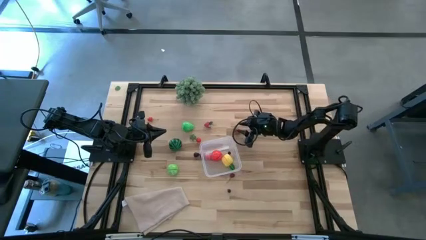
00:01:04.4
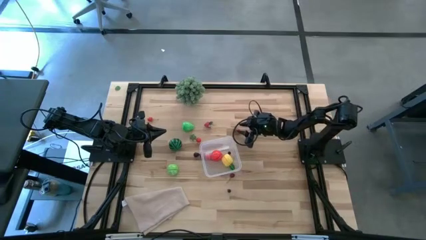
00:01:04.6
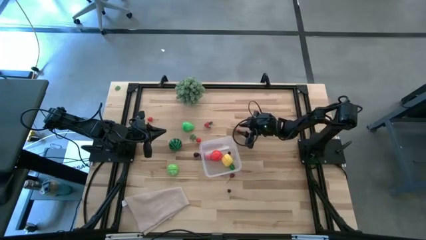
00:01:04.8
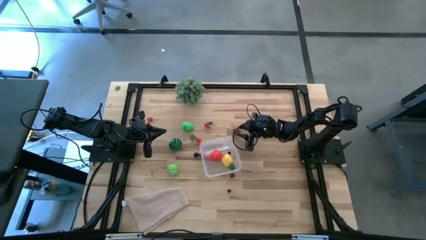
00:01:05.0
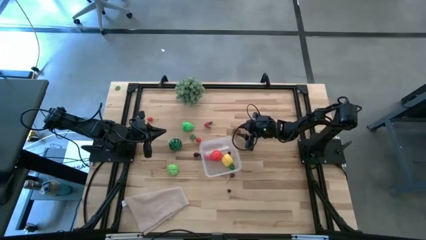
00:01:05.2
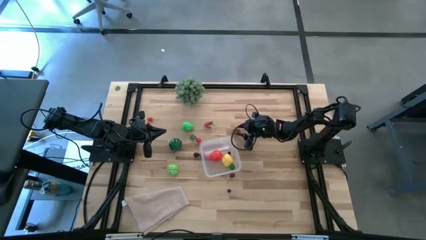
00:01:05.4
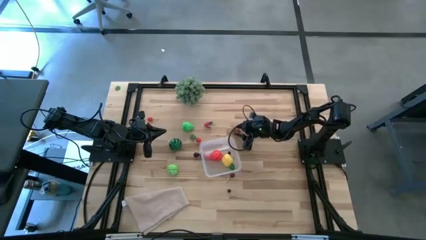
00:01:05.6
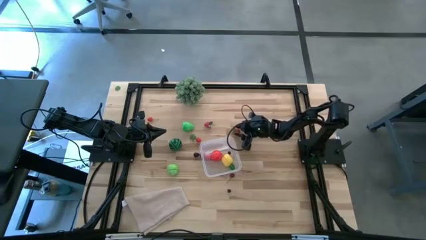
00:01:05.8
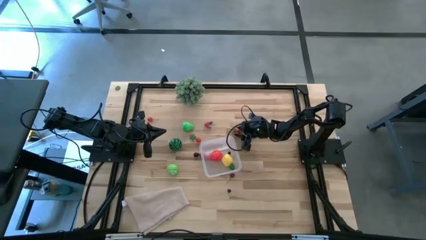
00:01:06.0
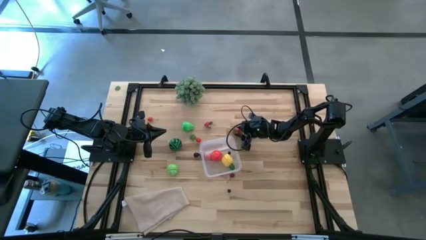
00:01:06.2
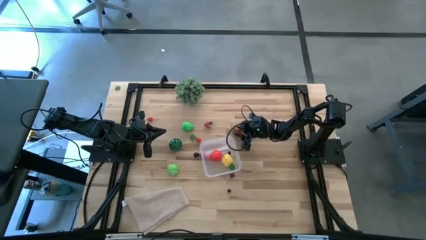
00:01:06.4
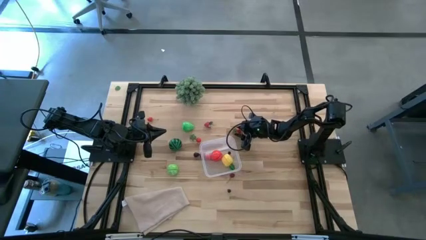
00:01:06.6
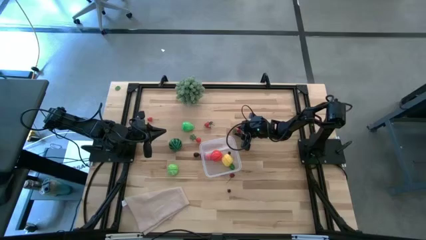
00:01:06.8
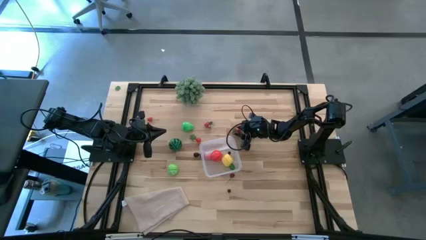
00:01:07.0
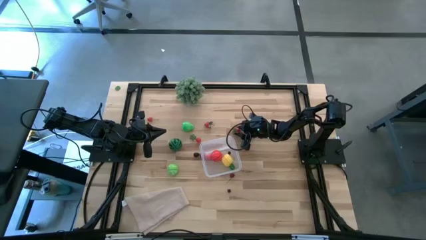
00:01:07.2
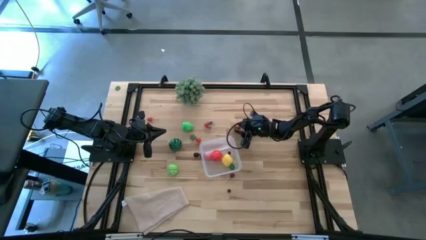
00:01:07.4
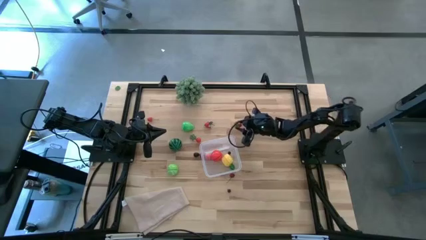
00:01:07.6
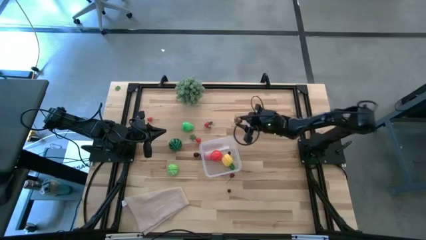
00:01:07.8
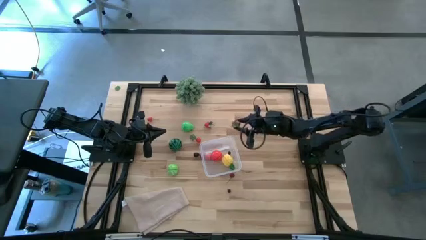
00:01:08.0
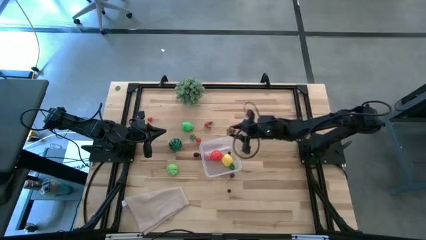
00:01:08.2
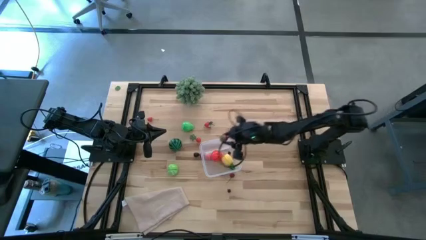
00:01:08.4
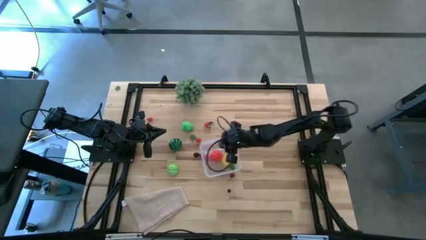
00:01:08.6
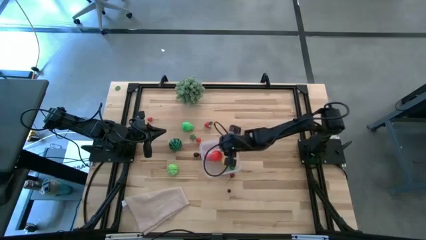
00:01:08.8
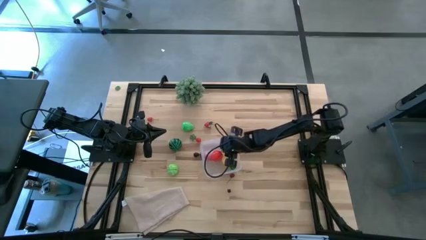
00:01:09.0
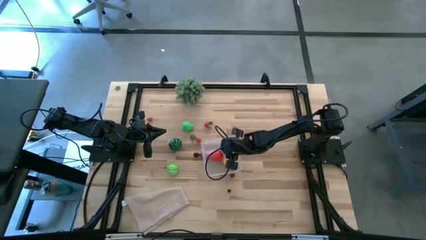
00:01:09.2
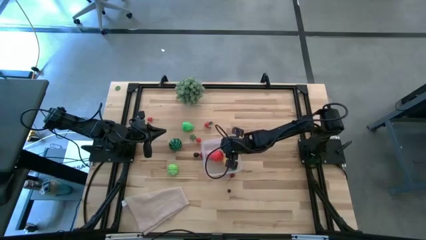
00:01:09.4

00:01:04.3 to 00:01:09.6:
Task: Pick and placing Produce into tupperware
Put the right red strawberry into the transparent bin

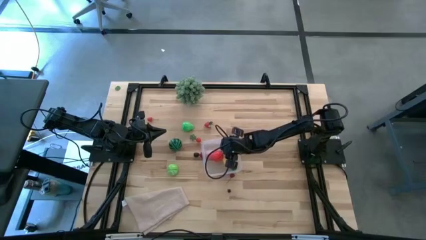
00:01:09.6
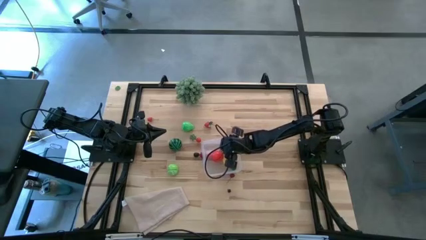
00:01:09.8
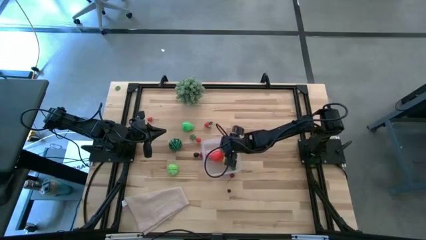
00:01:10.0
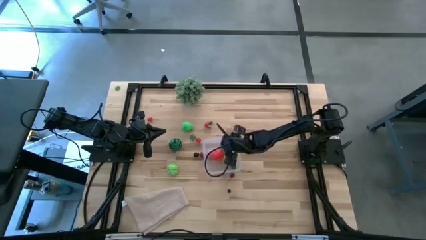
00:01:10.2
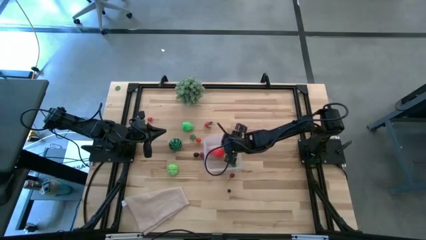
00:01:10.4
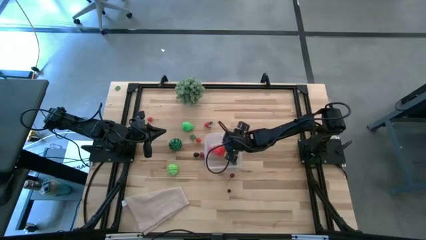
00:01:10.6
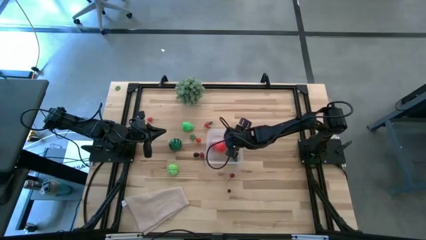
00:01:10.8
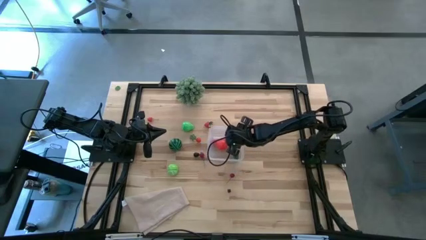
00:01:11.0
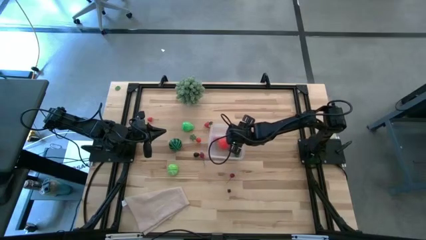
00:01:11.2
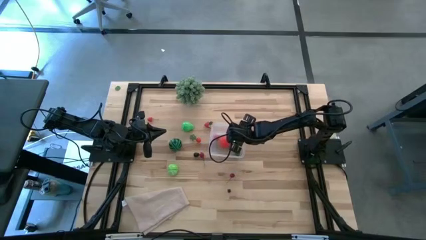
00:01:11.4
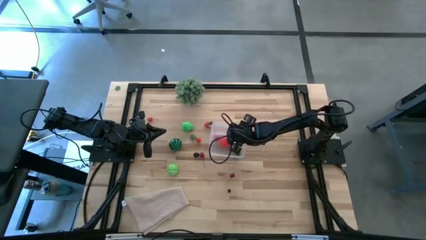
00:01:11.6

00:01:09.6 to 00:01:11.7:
Adjust the transparent bin

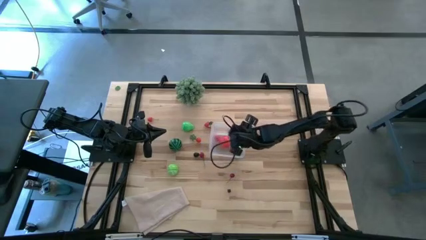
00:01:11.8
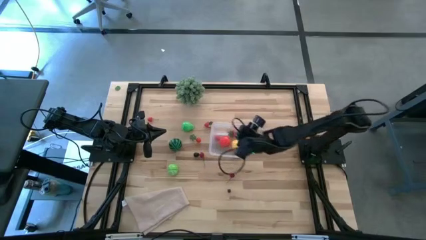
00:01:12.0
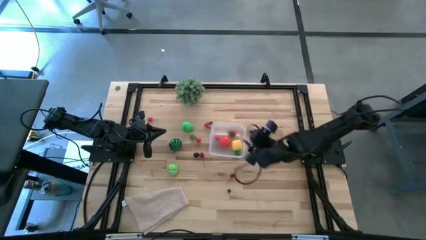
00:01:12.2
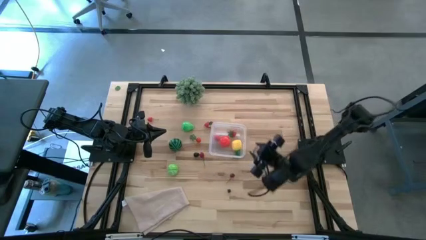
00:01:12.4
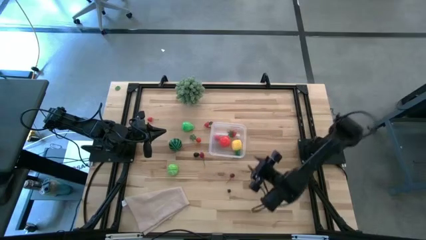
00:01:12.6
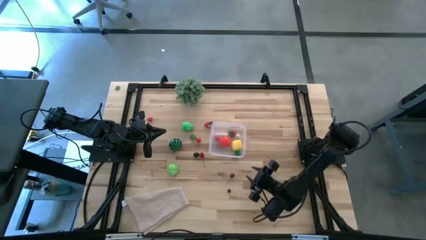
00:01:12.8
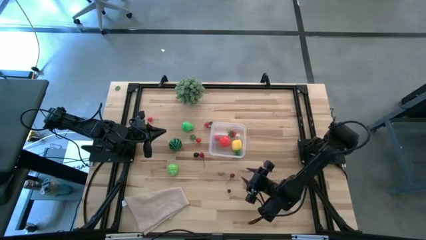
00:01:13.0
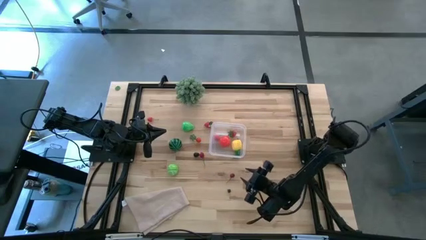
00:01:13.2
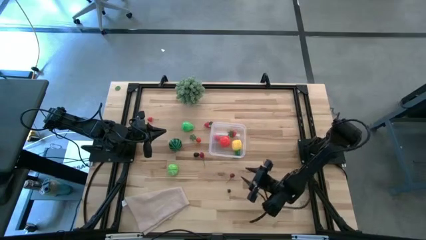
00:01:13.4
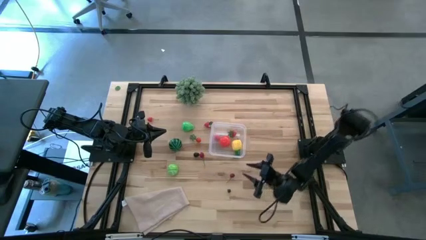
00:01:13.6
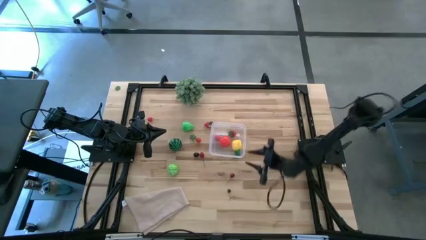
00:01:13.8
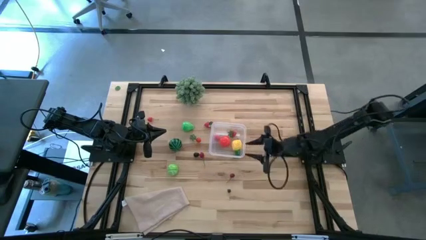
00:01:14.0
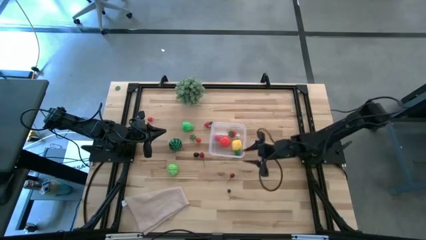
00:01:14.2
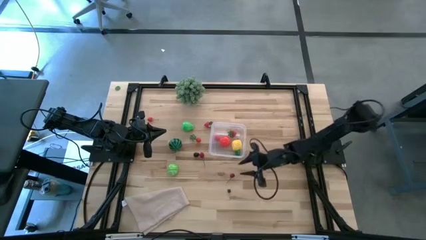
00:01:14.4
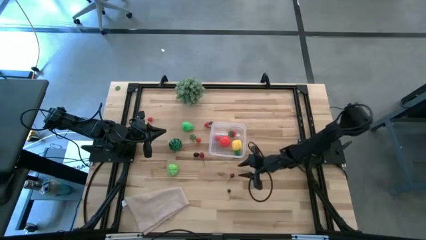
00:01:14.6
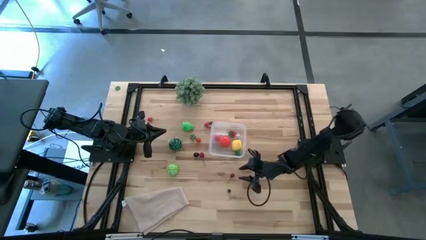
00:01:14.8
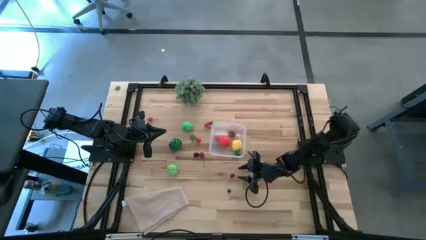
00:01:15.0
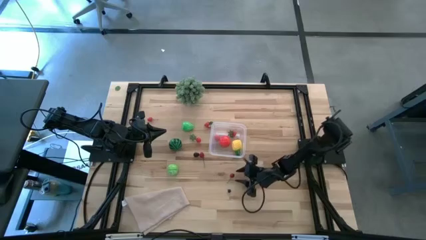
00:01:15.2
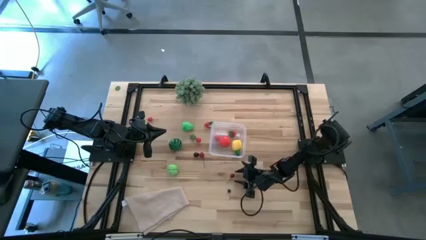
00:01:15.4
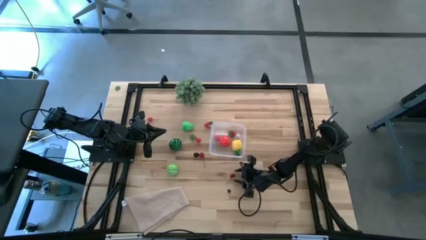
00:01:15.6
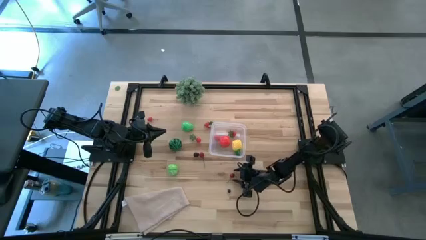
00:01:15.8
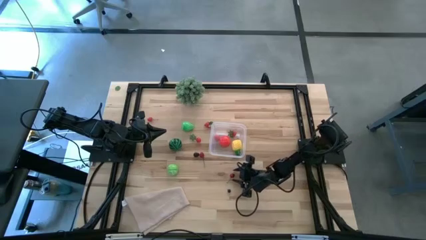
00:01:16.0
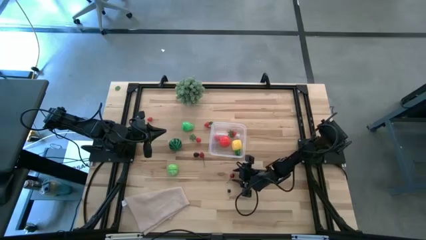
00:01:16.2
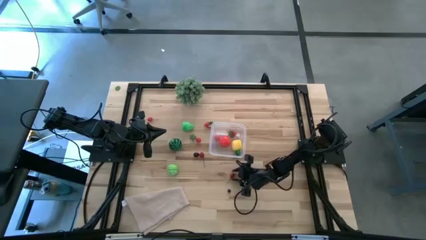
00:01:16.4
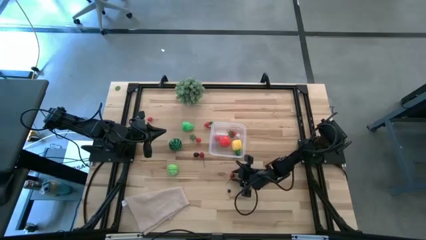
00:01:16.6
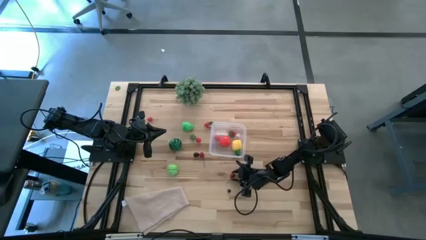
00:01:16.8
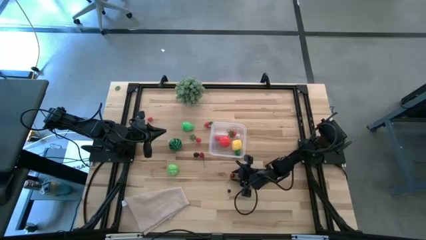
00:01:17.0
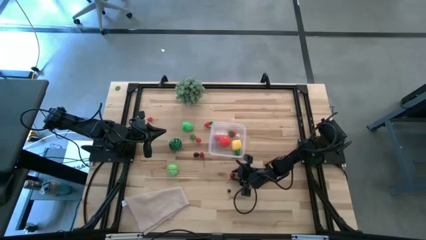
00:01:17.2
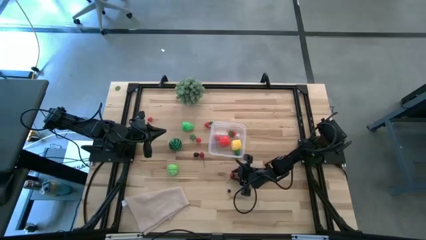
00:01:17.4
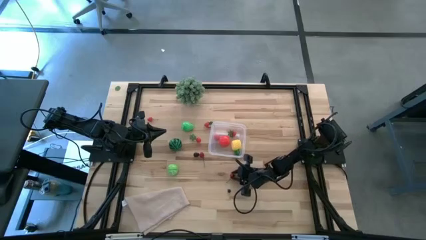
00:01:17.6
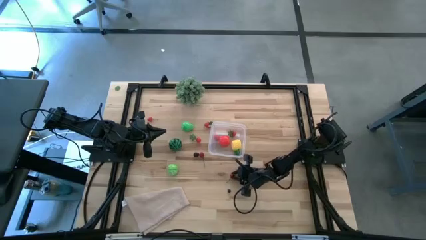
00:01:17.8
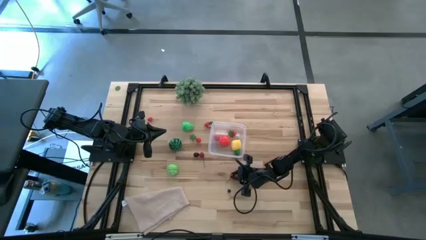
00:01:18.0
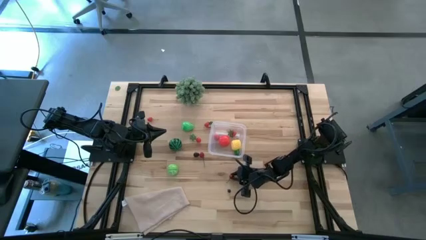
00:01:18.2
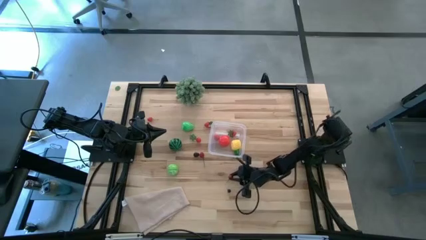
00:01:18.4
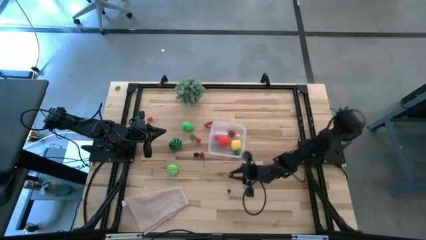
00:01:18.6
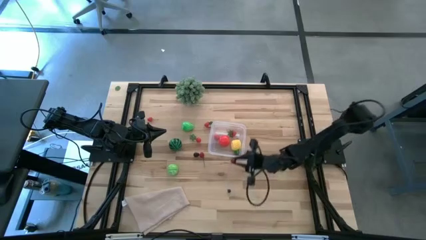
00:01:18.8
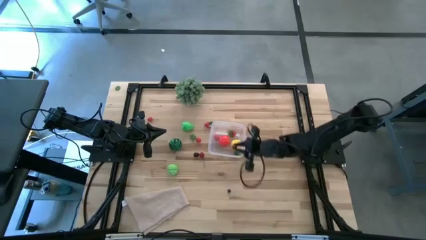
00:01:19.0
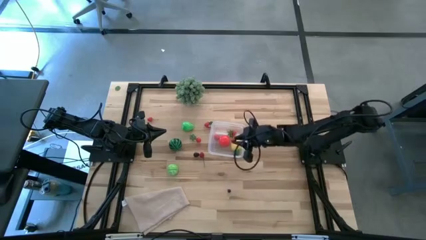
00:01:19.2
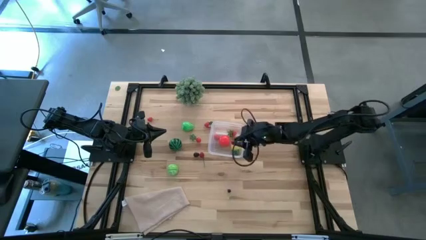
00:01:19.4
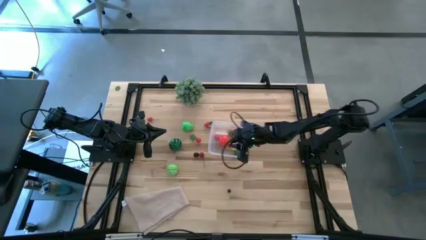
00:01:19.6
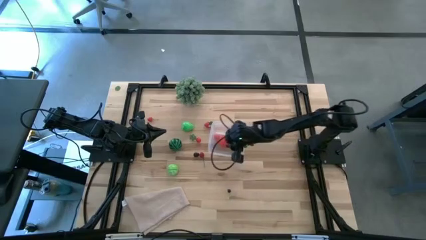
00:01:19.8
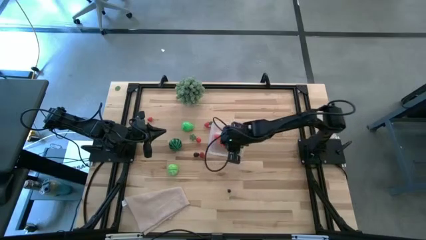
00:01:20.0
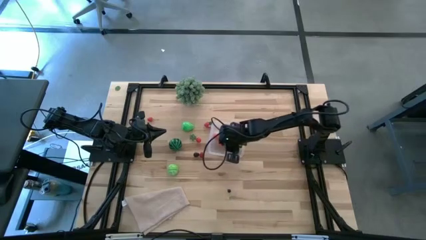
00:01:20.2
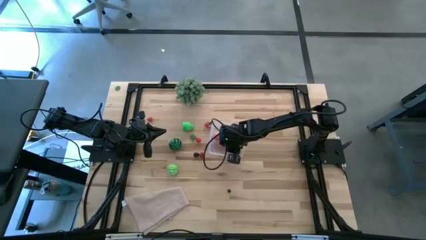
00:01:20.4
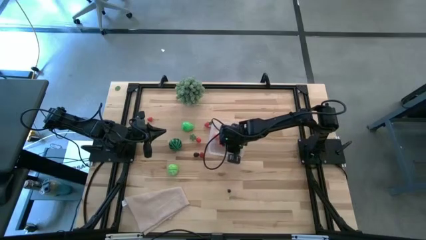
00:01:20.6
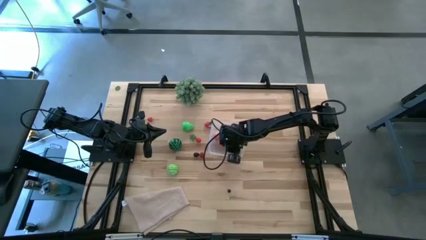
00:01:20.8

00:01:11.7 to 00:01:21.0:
Put the bottom red cherry into the transparent bin
